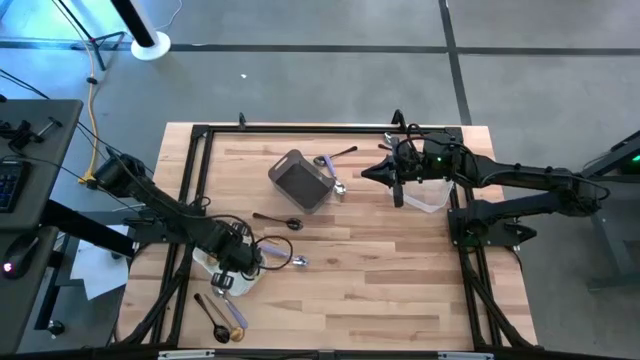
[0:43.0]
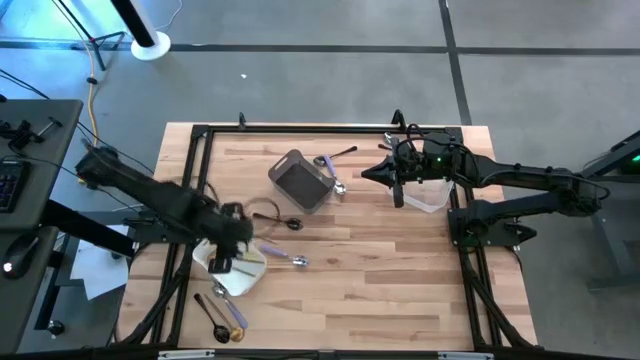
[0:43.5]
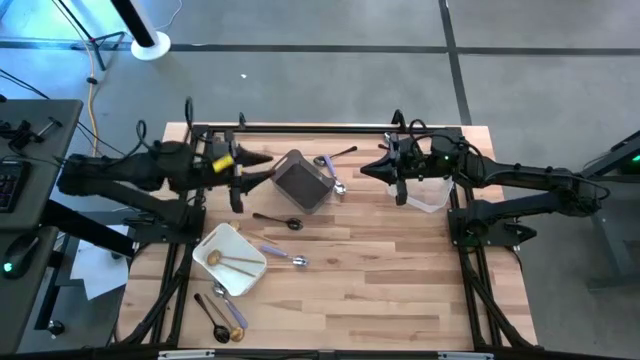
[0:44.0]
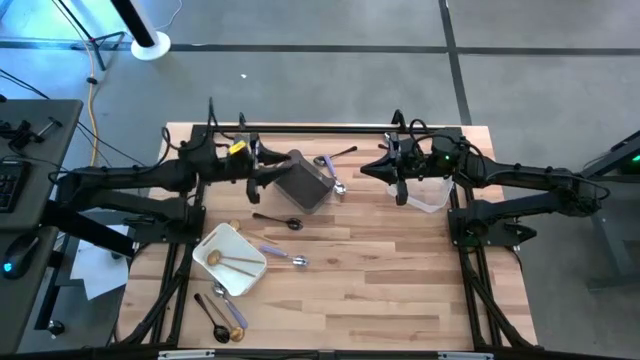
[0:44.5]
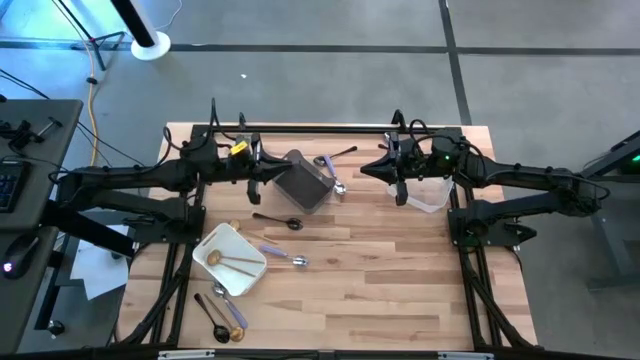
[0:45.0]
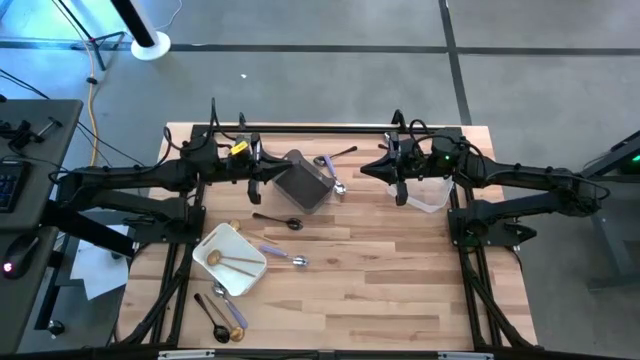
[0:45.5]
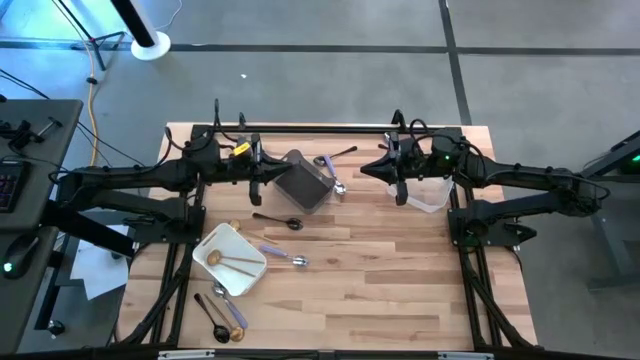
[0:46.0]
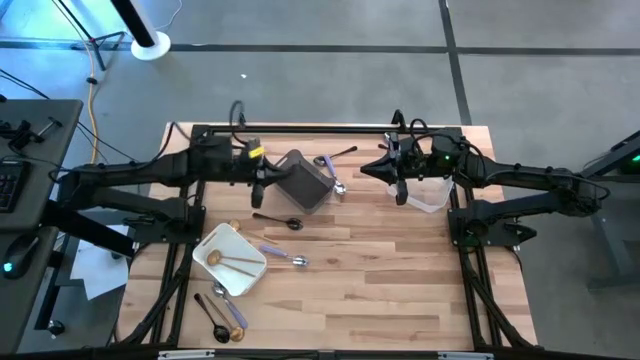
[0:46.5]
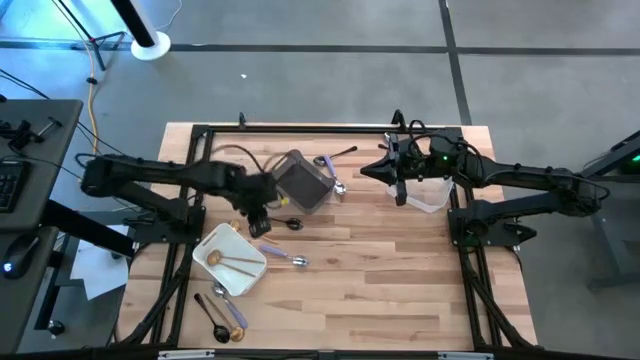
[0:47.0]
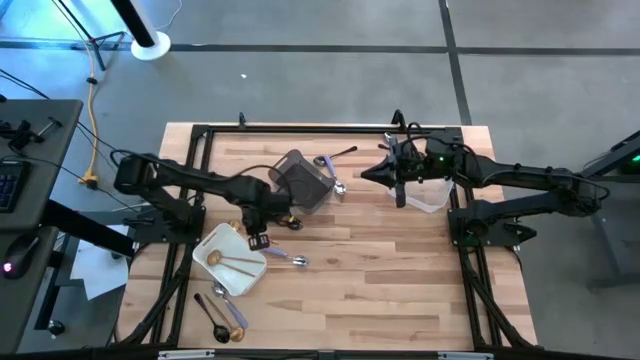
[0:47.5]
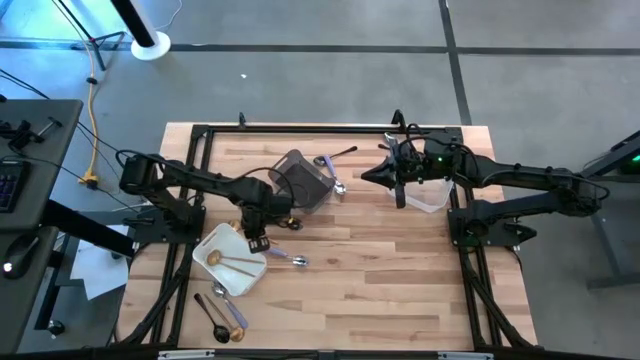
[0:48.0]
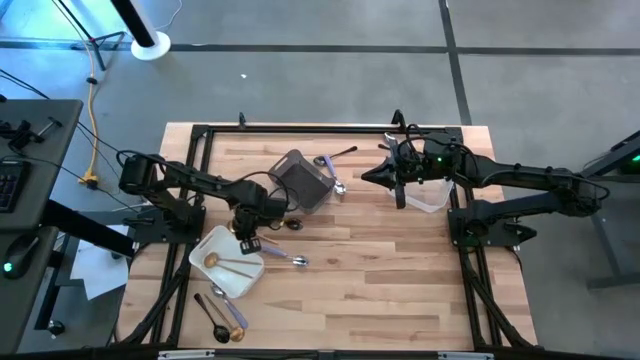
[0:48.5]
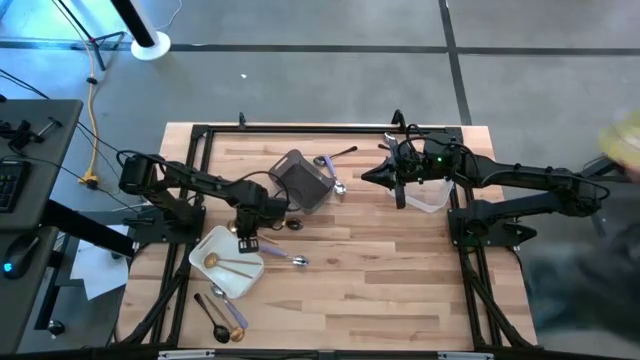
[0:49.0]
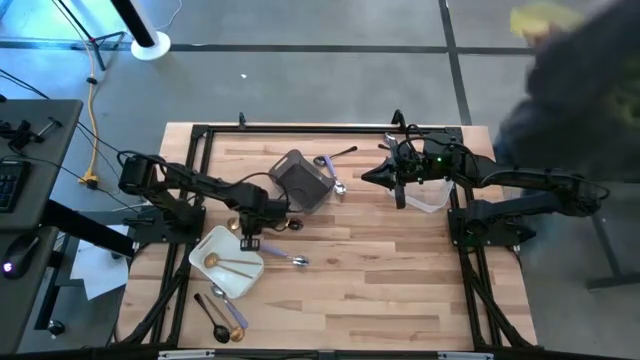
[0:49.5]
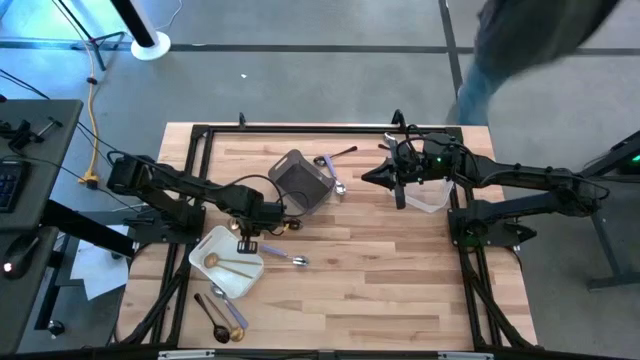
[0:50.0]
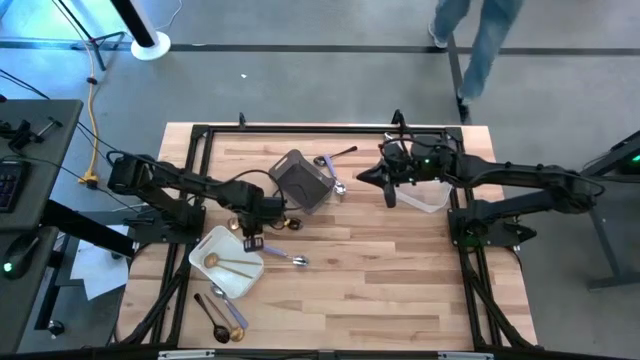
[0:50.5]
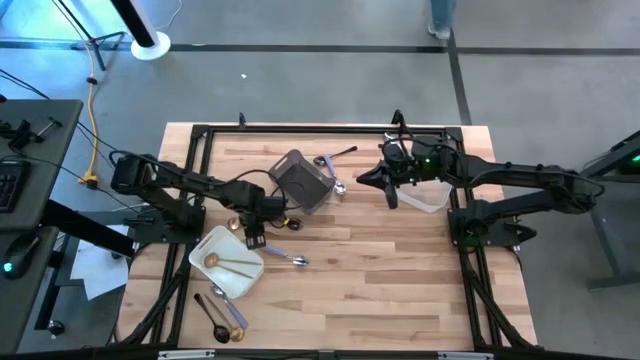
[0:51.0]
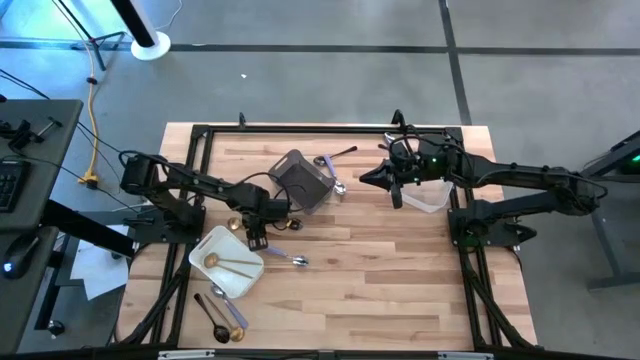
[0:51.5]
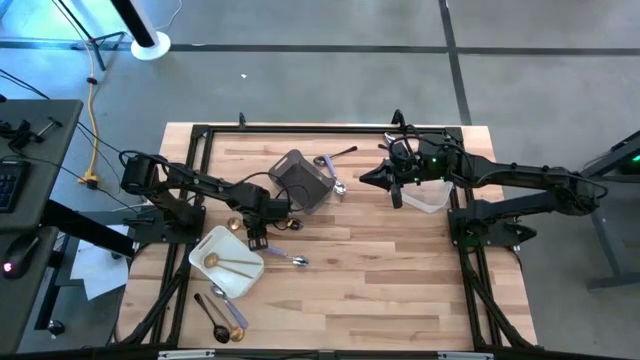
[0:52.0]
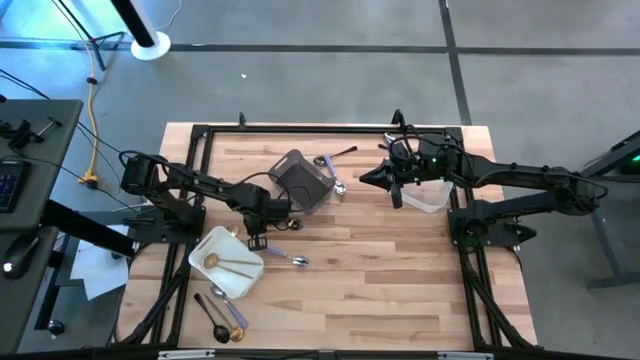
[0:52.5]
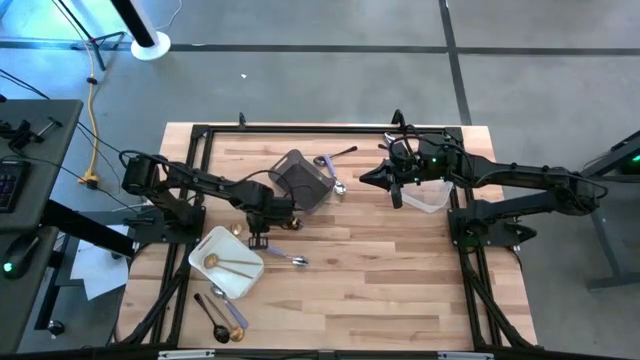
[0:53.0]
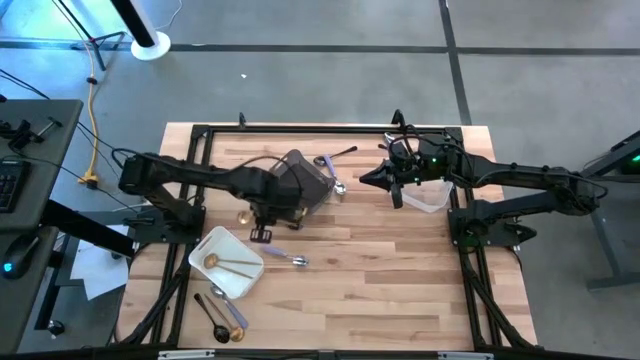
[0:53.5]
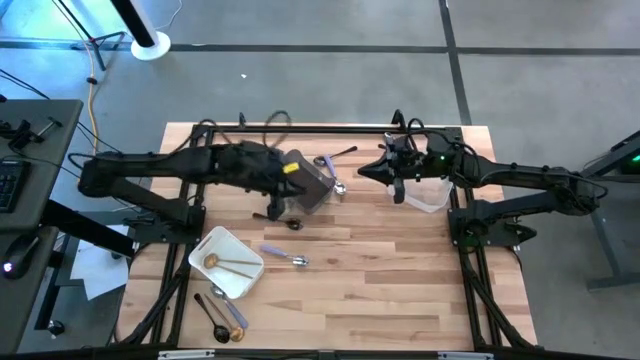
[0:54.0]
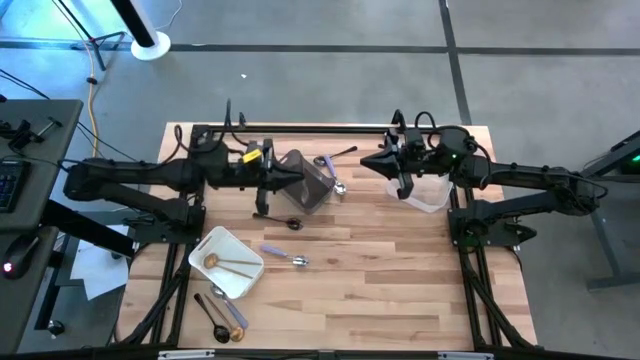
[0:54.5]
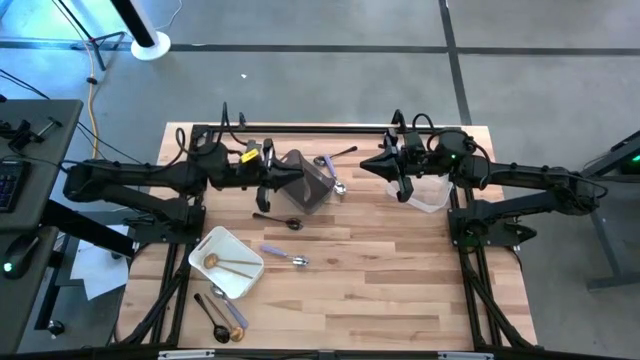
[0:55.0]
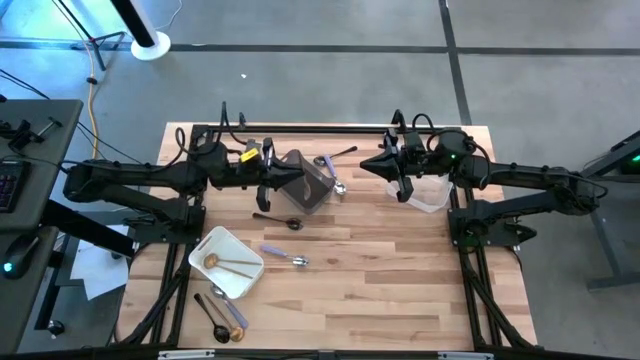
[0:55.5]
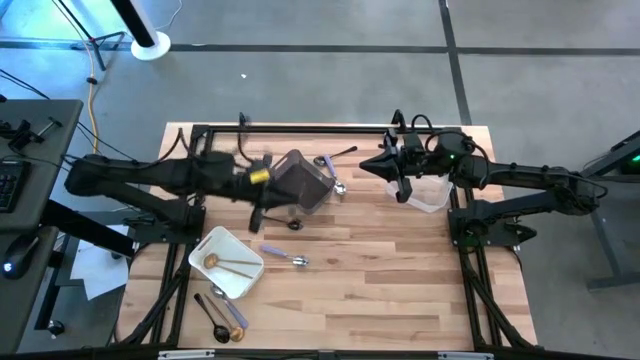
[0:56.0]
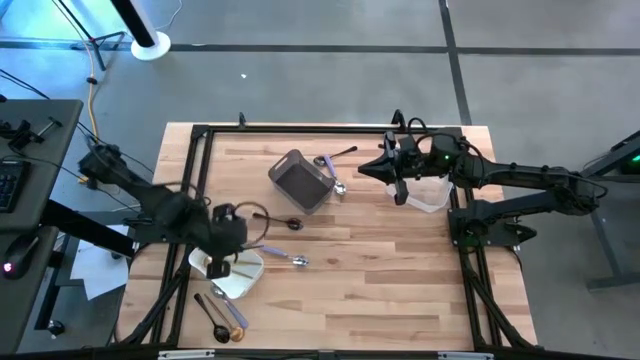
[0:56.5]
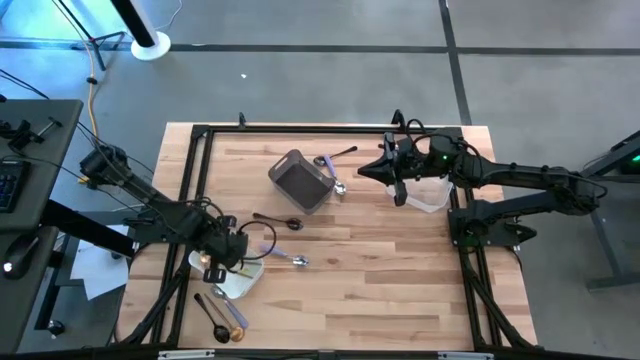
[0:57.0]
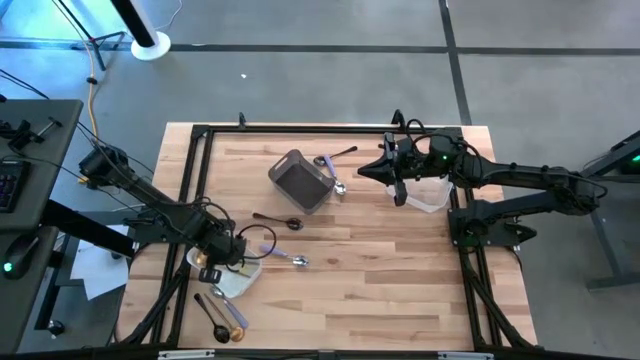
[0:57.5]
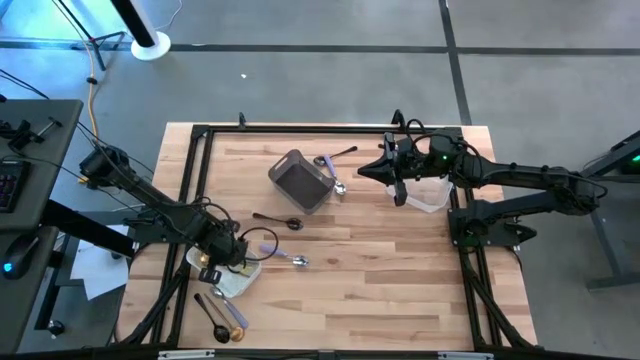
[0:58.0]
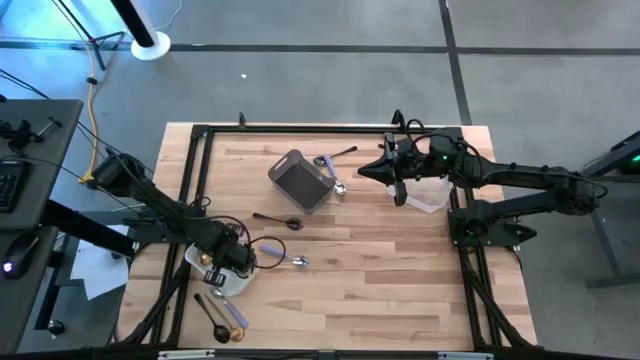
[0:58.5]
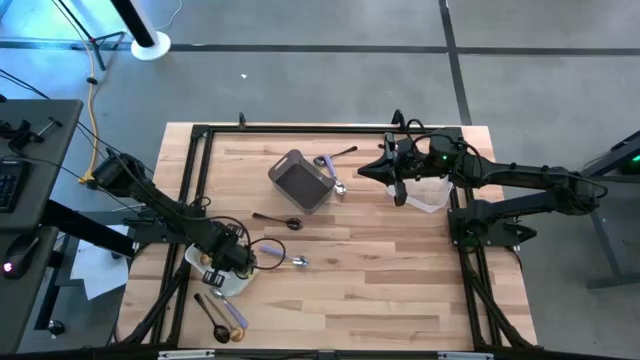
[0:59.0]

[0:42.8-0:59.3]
Task: Sort silverware by color (type)
Put the top gold spoon into the white bin

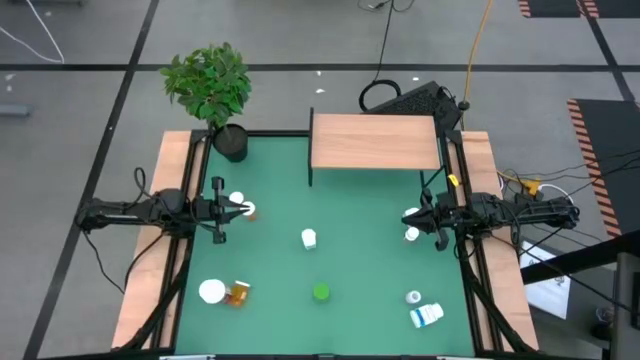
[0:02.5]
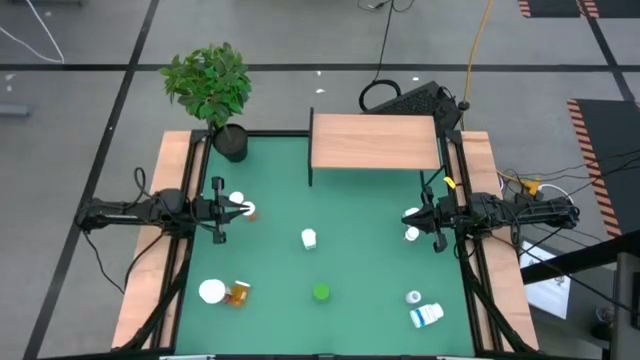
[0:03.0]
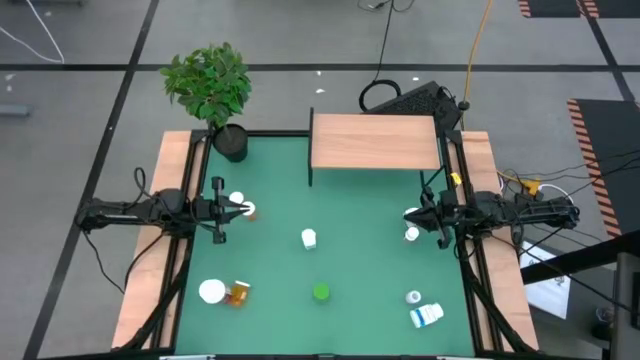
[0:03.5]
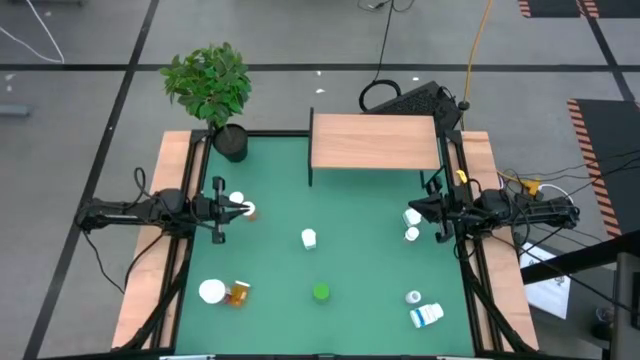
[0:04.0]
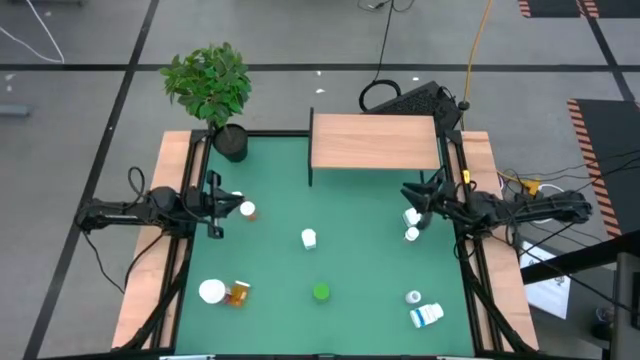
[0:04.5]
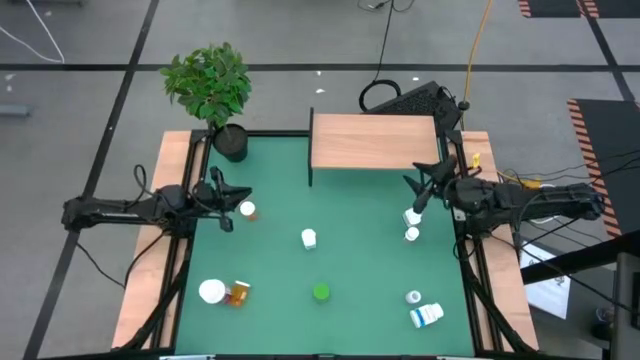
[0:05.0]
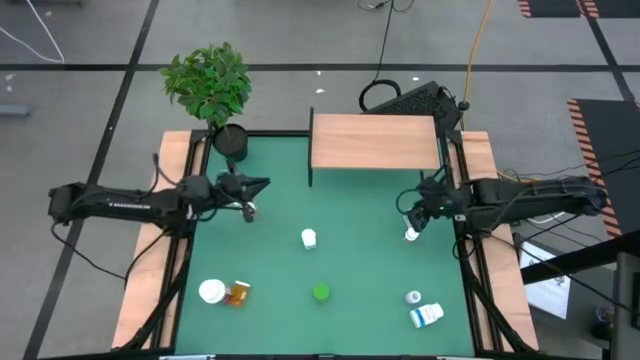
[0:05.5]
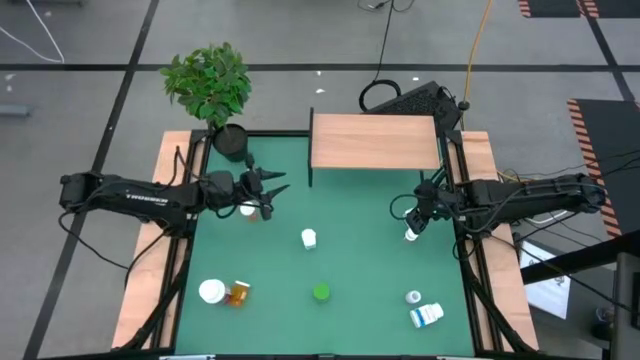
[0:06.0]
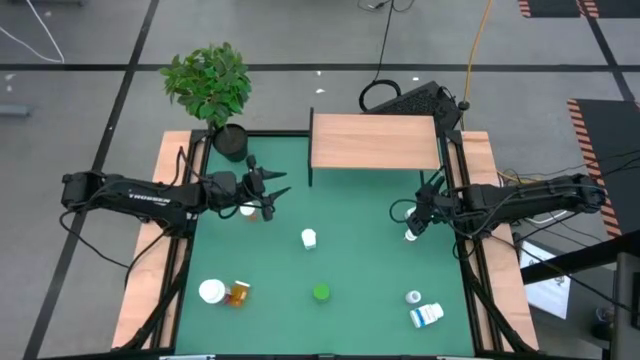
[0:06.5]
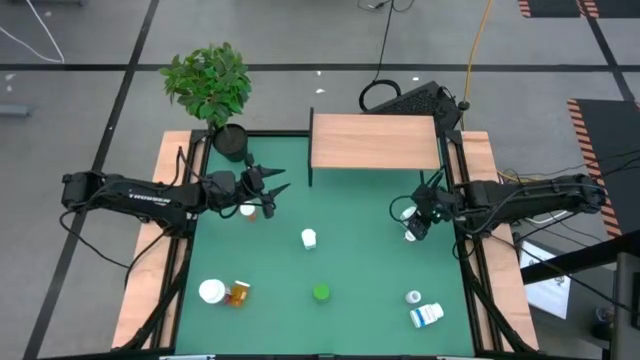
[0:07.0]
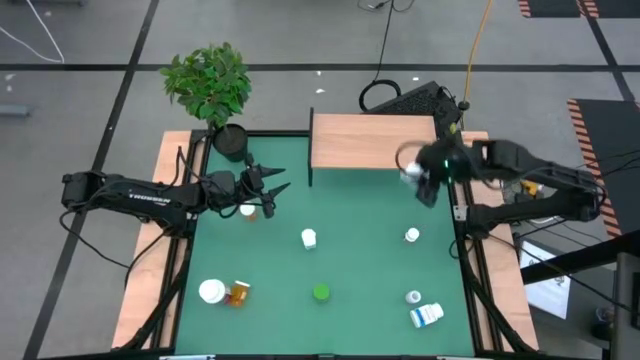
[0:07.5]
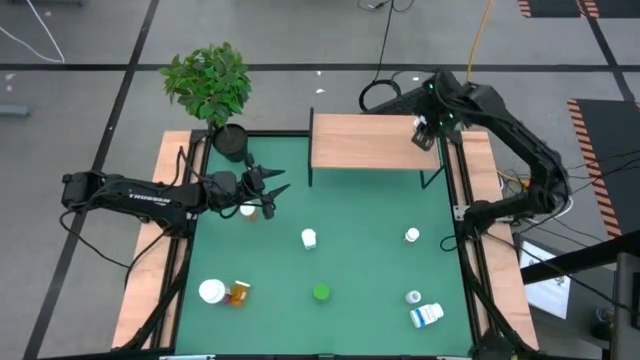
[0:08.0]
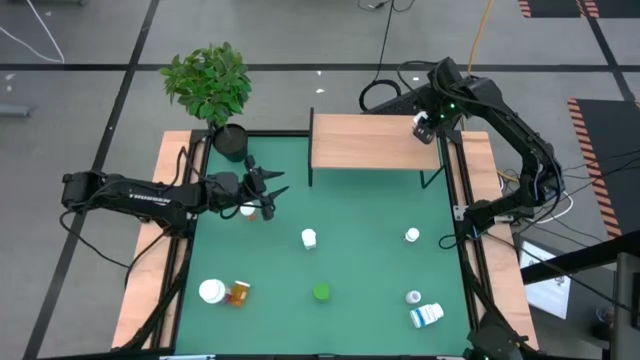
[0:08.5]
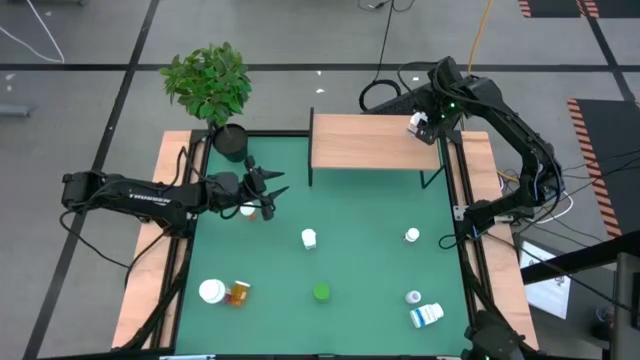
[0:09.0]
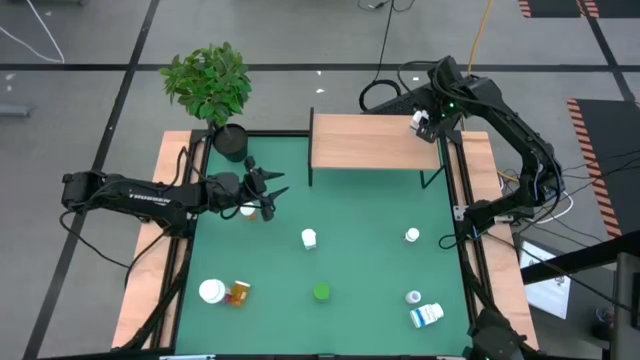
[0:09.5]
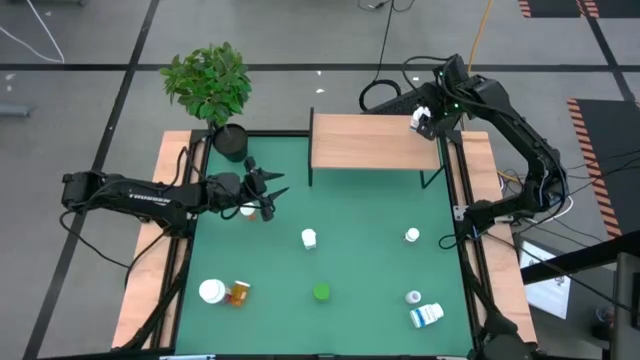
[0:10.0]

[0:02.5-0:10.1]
Task: Pick and place medicine bottles onto shelf by color
Put the top blue pill bottle on the shelf
